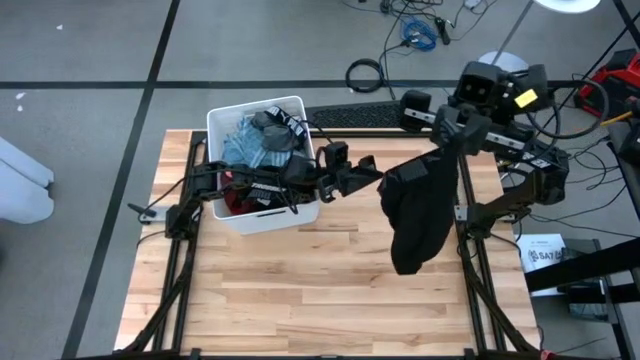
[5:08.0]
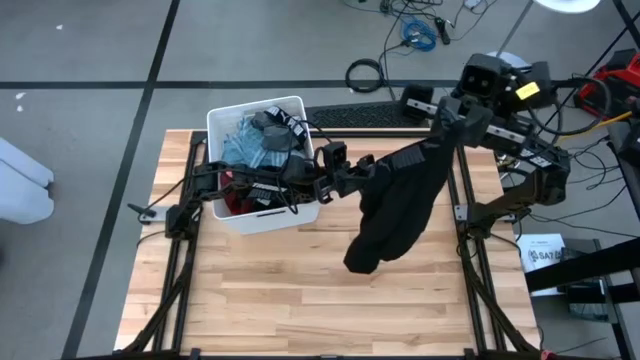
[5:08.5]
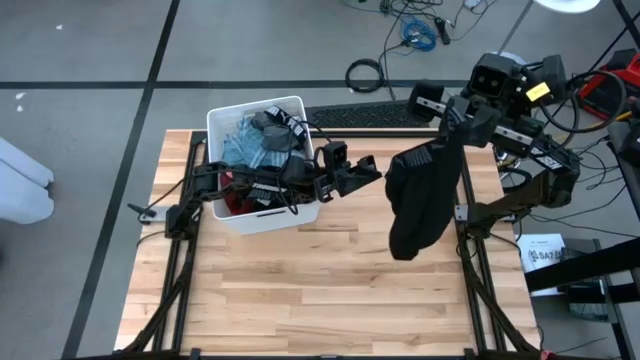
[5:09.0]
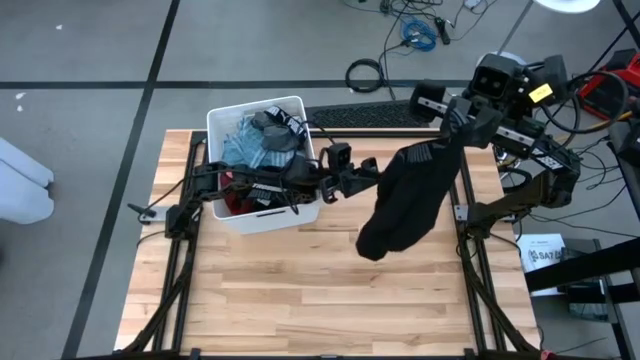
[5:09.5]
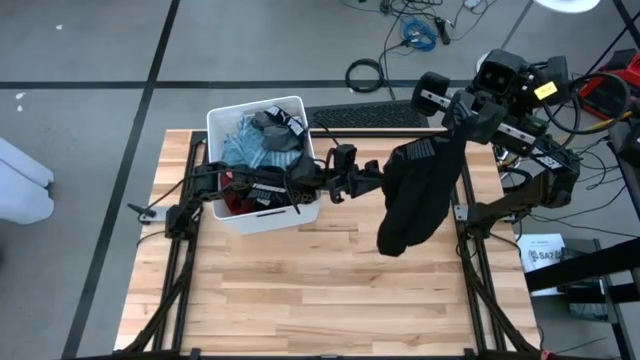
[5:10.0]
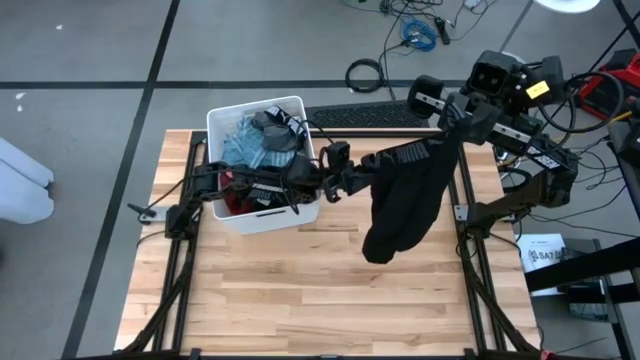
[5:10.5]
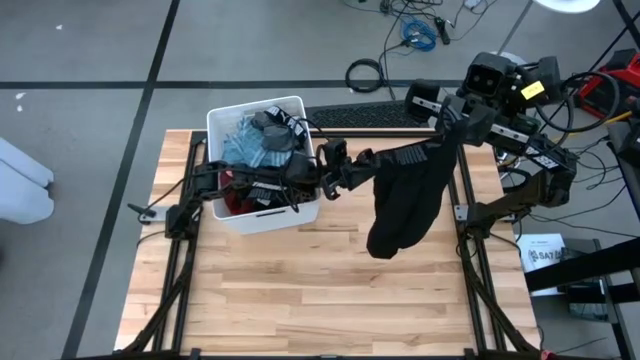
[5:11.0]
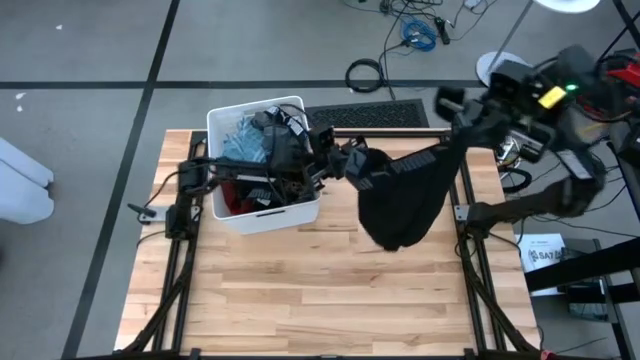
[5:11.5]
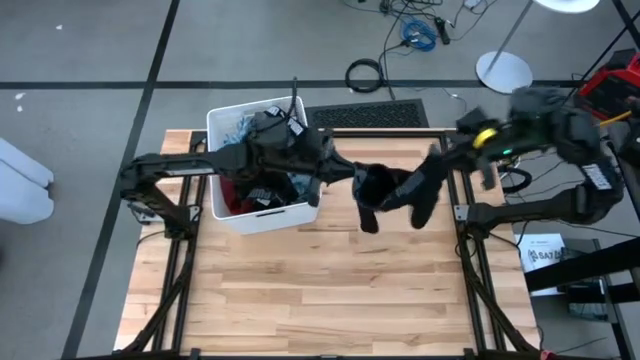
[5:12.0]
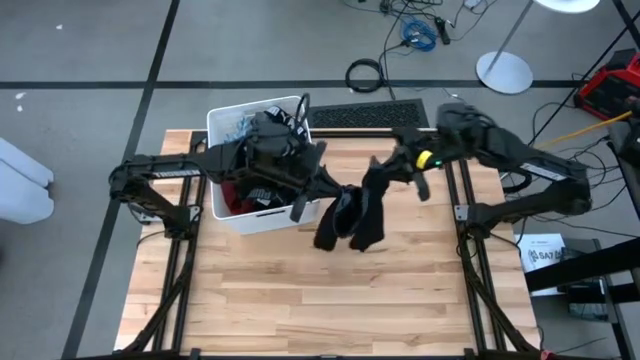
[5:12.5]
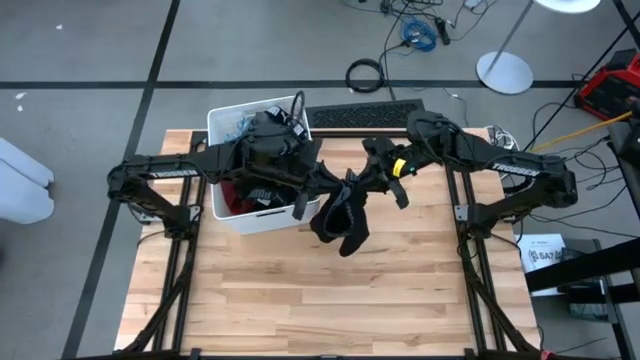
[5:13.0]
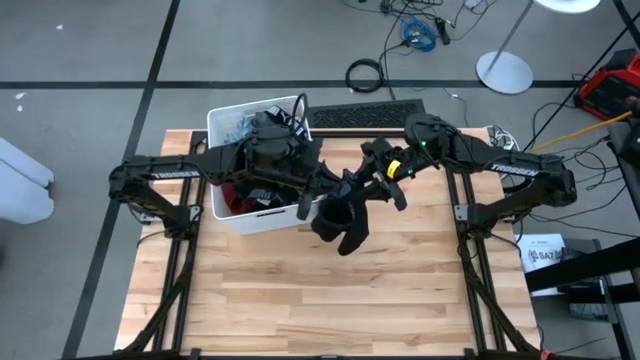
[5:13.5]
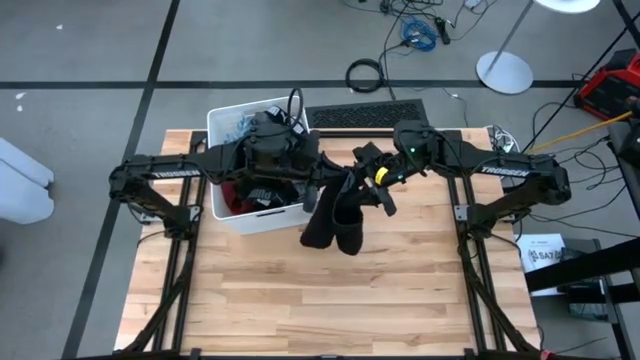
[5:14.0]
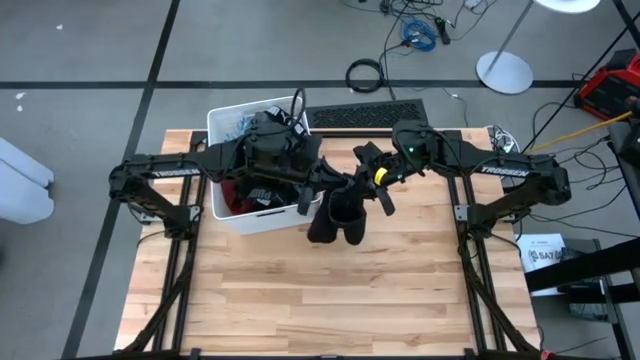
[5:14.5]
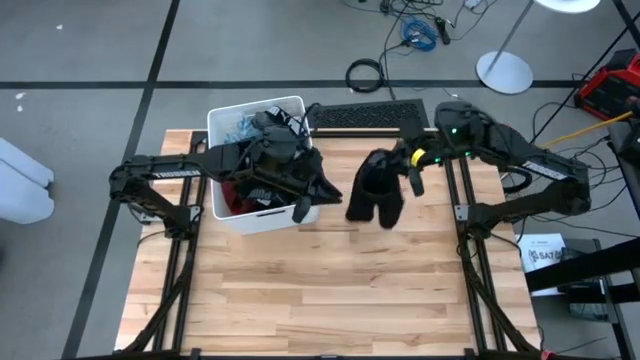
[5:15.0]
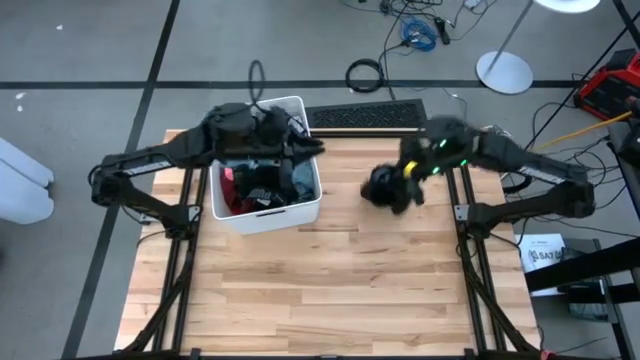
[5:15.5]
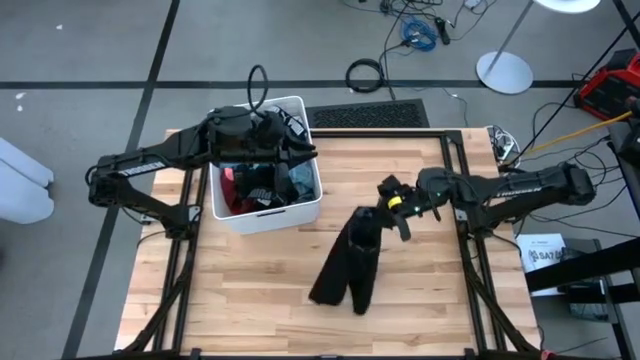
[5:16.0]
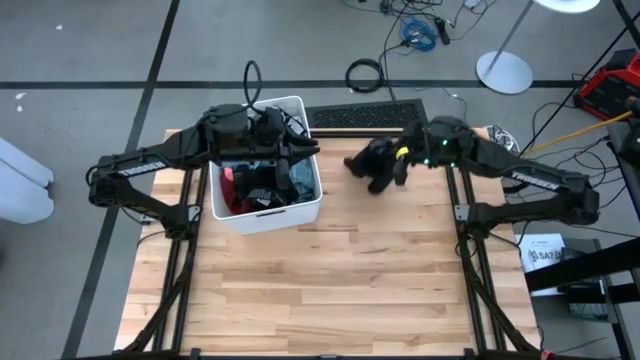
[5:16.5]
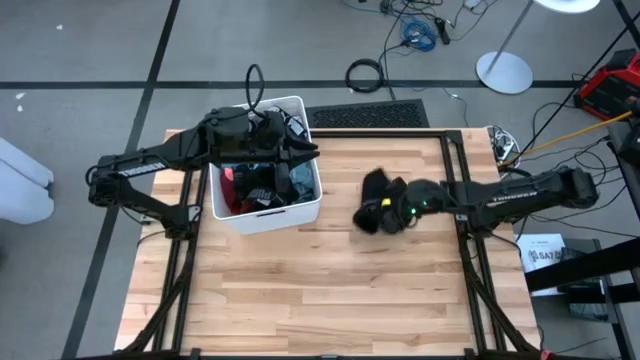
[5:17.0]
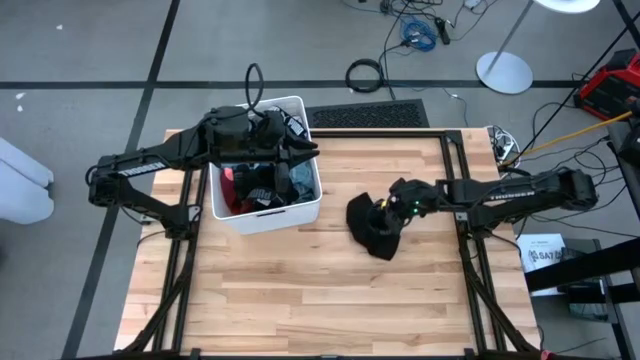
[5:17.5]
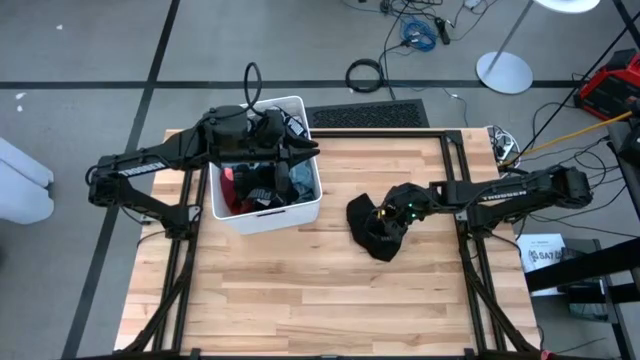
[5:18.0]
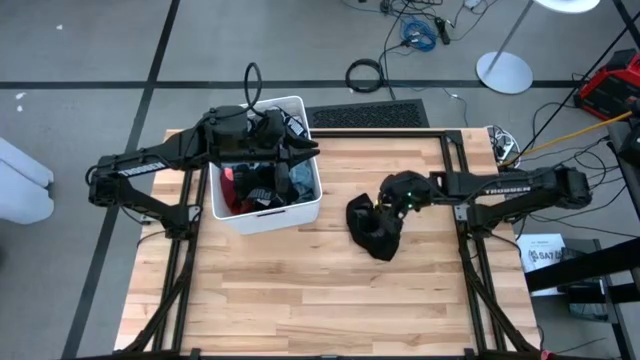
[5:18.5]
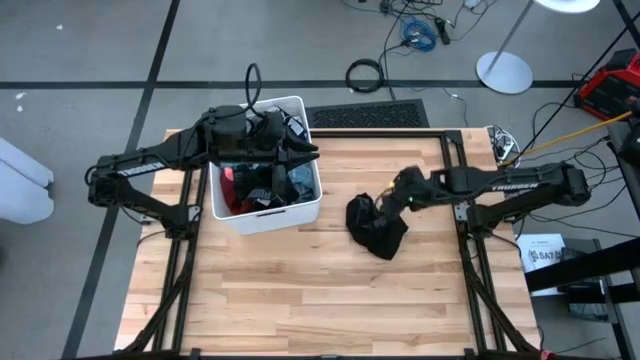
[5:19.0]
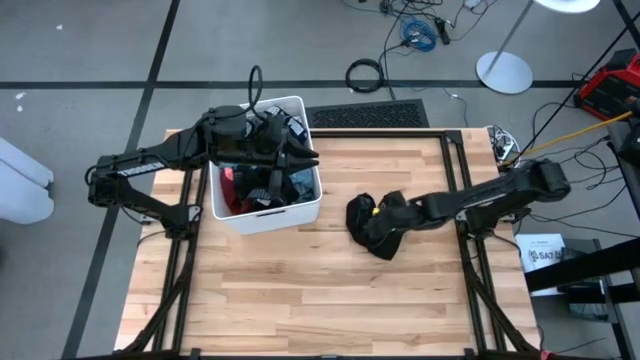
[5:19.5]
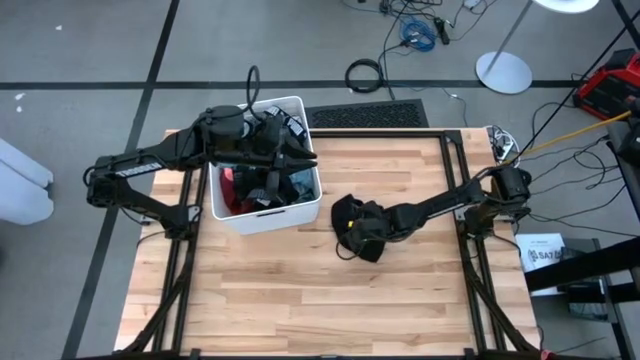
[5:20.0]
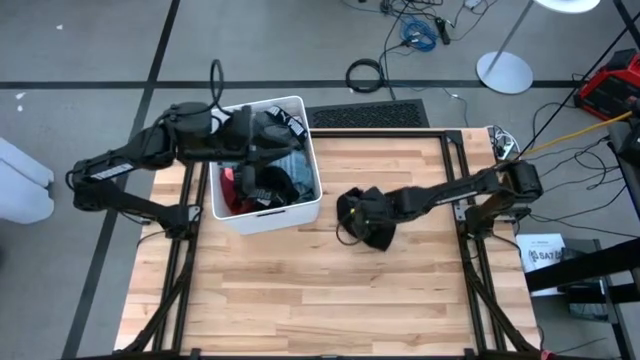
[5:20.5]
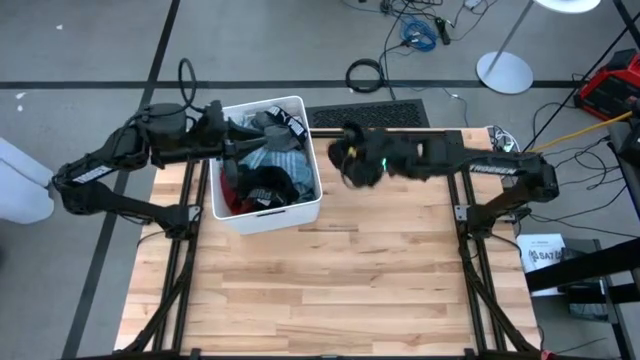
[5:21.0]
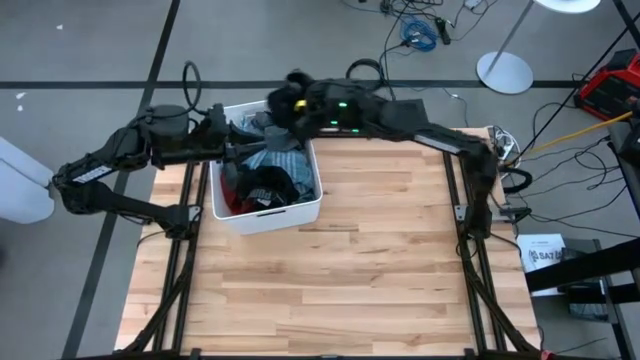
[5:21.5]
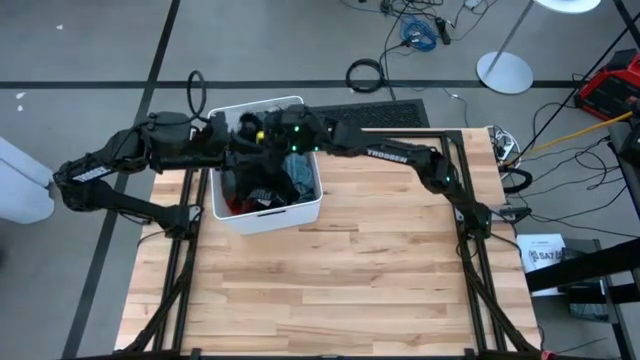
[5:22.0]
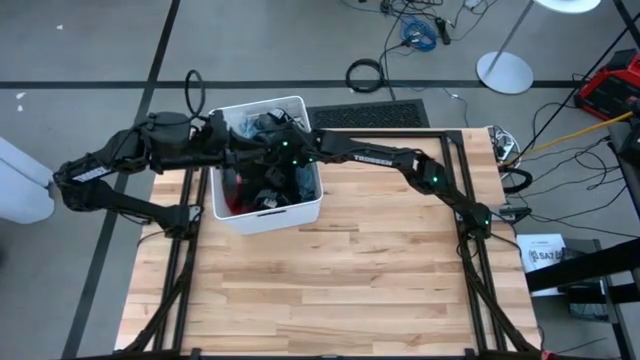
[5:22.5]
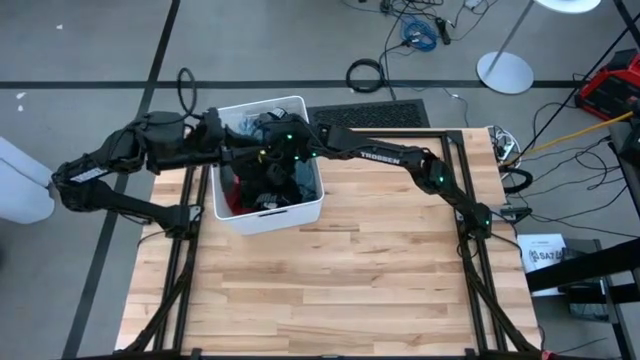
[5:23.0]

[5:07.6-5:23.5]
Task: Sort clothes
Put the black shorts into the white laundry organizer

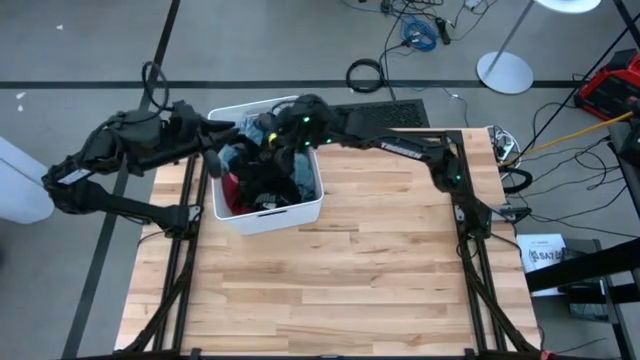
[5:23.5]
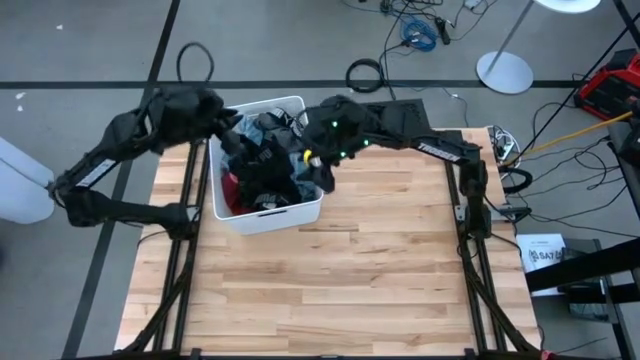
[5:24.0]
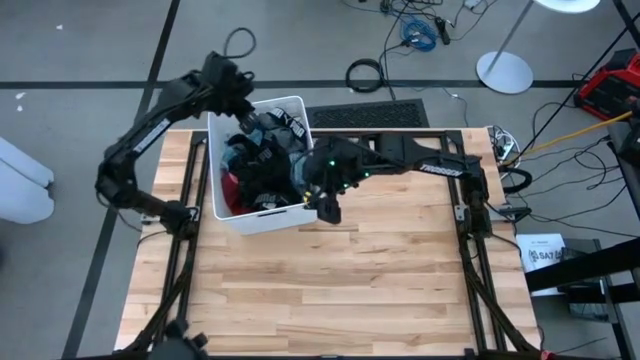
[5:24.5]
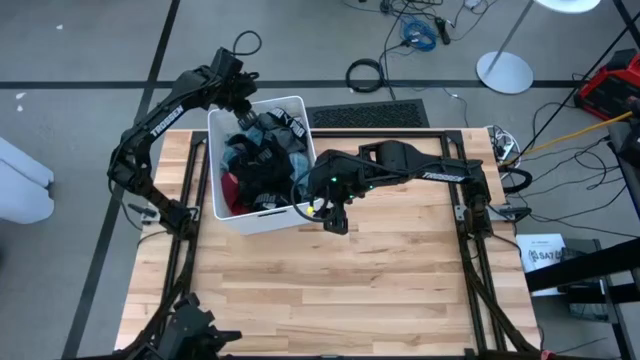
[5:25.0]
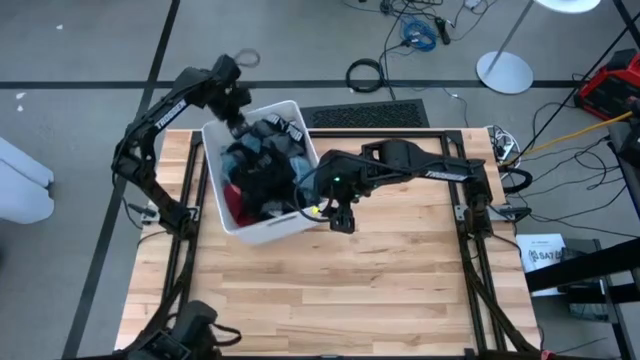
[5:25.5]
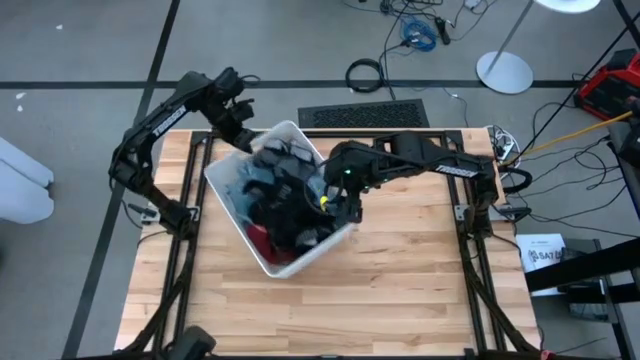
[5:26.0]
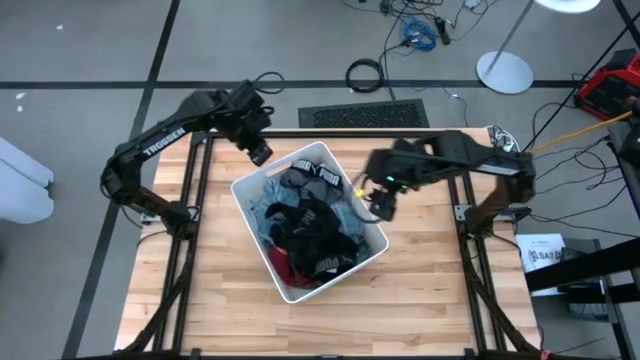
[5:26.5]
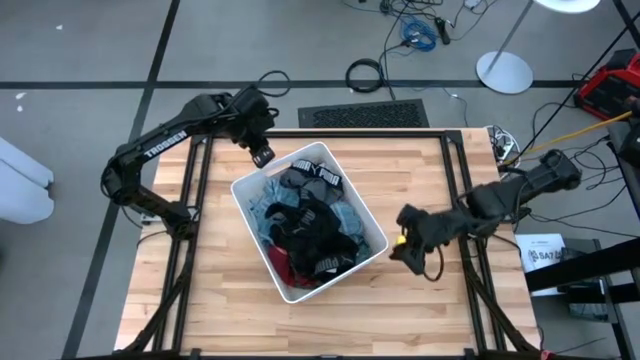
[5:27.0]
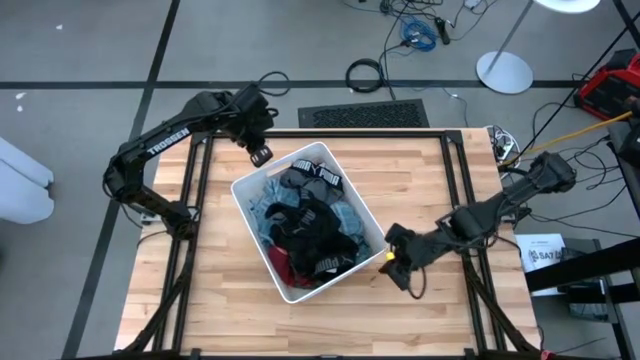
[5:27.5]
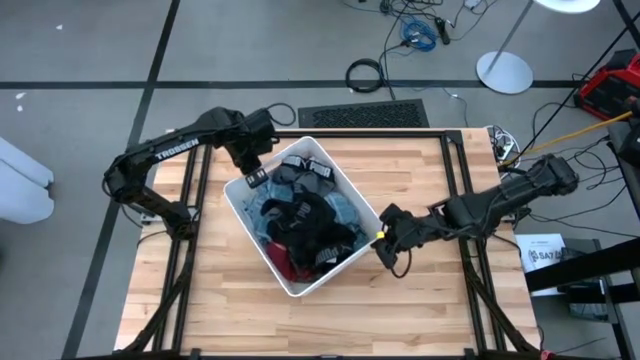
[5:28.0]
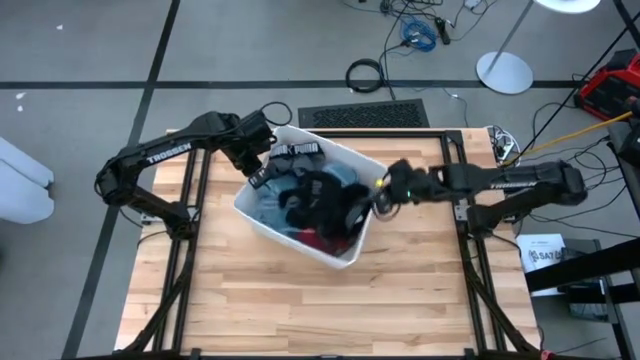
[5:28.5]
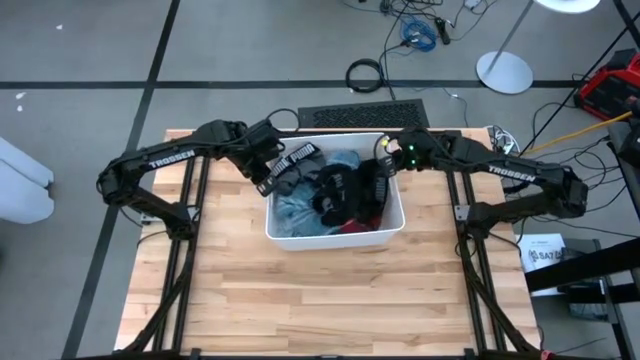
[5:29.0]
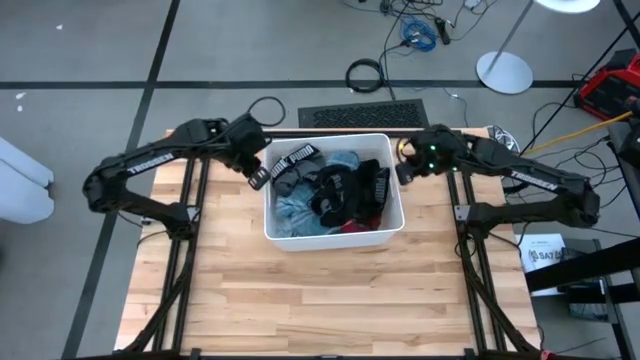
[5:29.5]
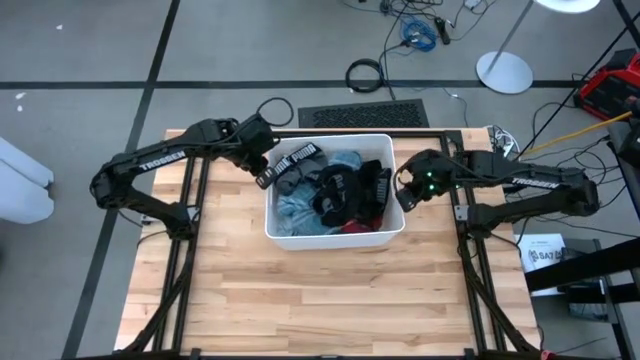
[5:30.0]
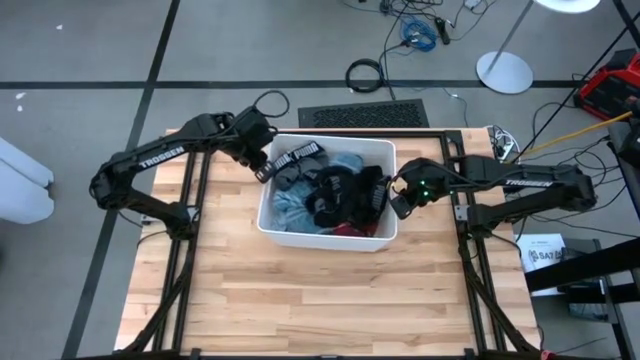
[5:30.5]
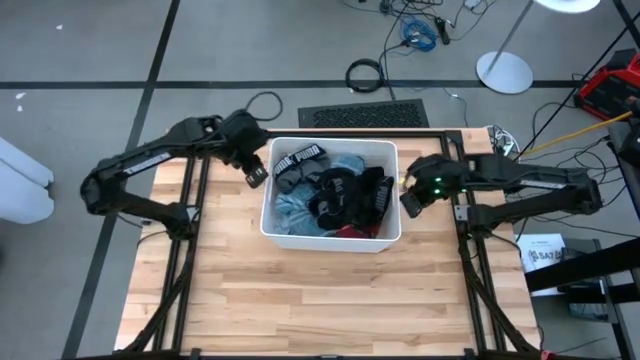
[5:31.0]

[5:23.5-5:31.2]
Adjust the white laundry organizer
